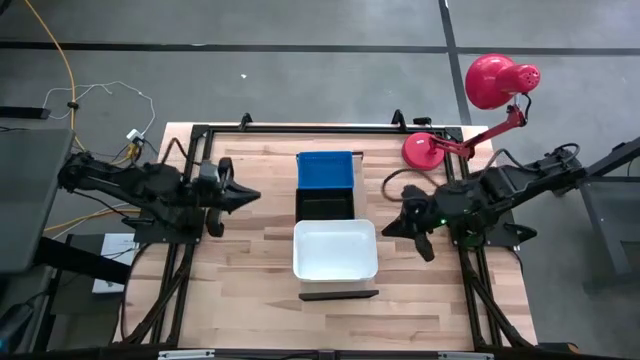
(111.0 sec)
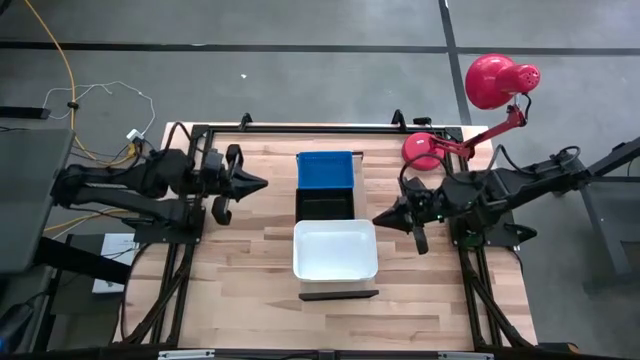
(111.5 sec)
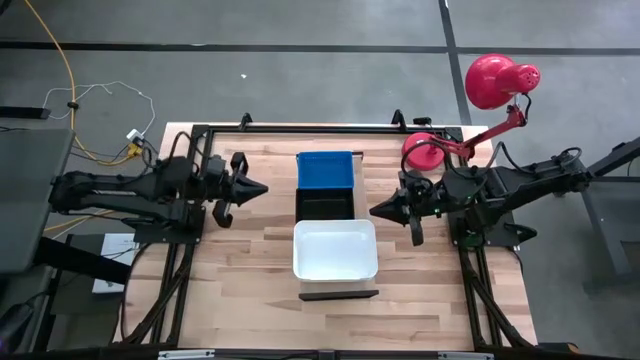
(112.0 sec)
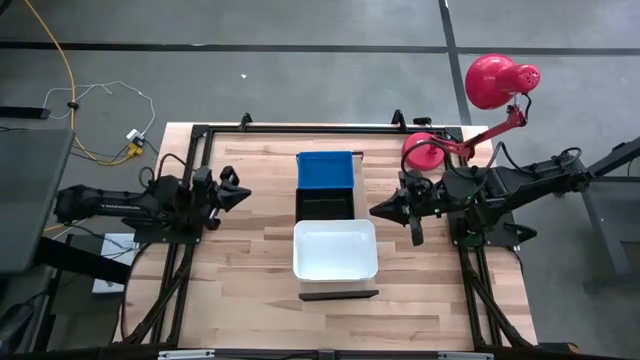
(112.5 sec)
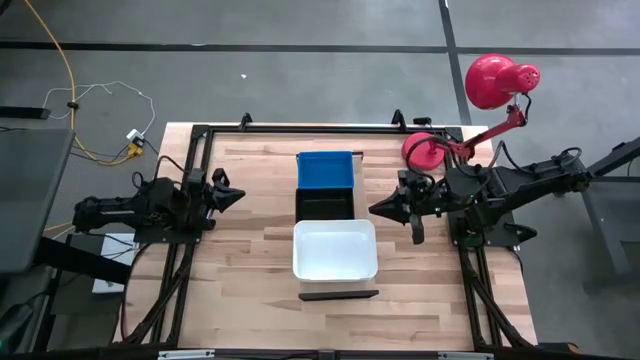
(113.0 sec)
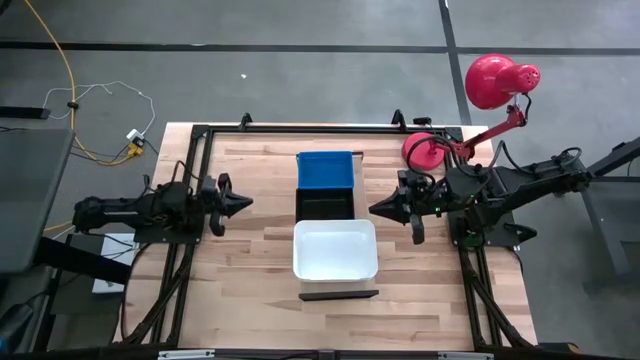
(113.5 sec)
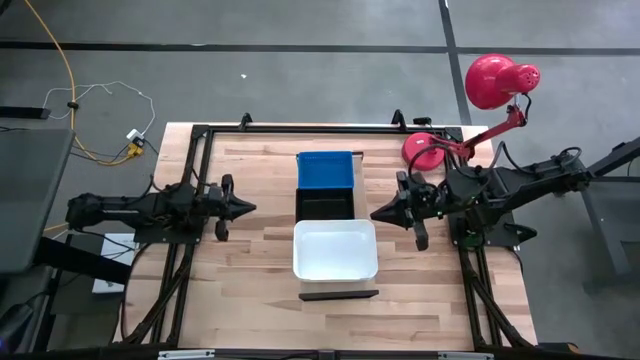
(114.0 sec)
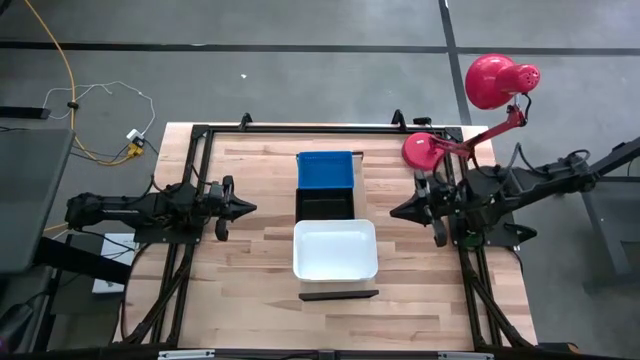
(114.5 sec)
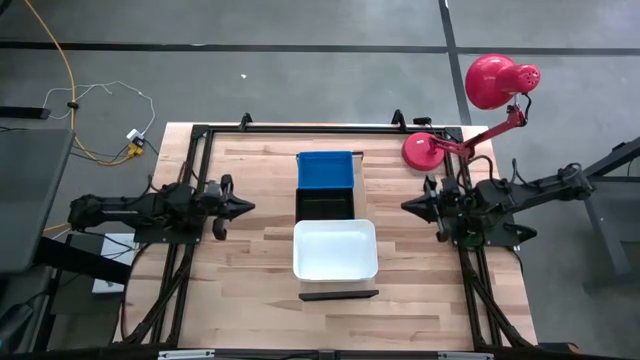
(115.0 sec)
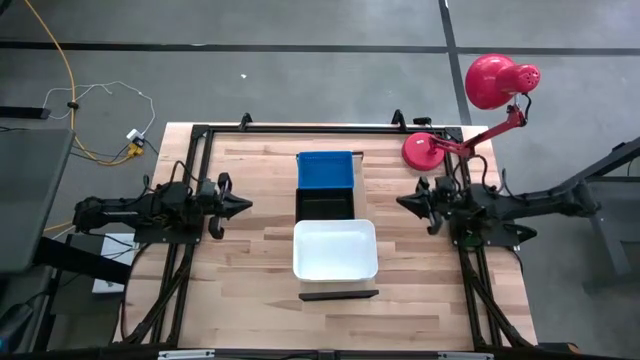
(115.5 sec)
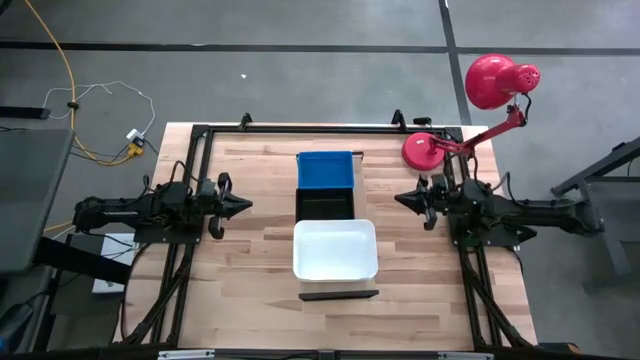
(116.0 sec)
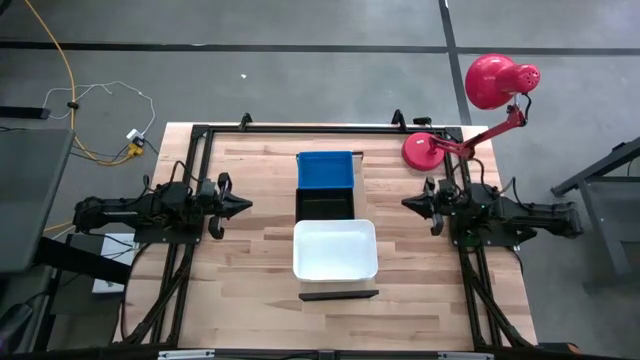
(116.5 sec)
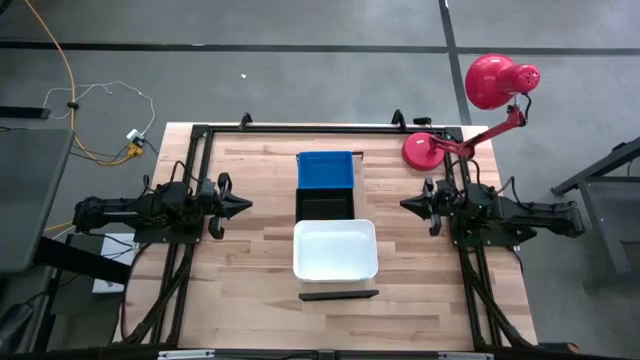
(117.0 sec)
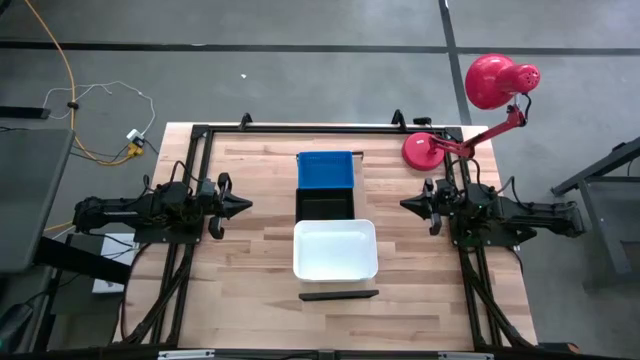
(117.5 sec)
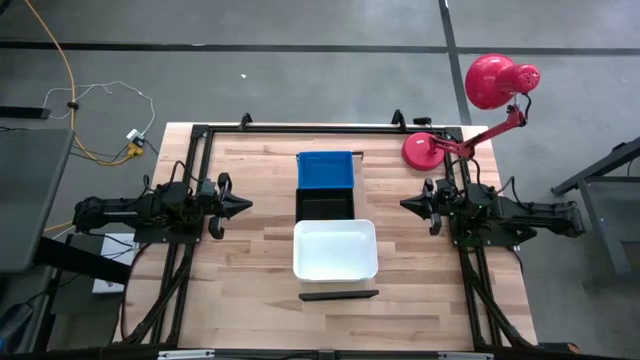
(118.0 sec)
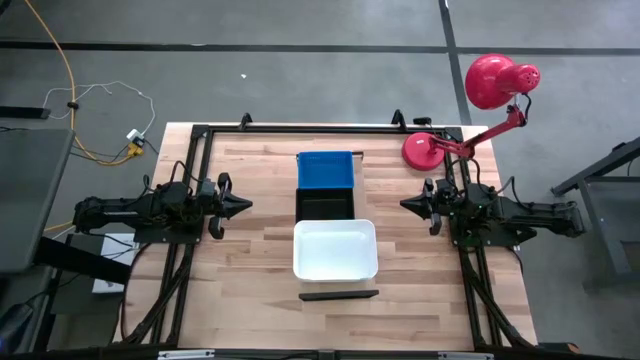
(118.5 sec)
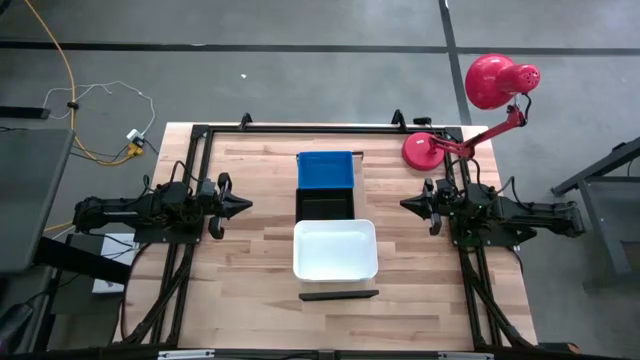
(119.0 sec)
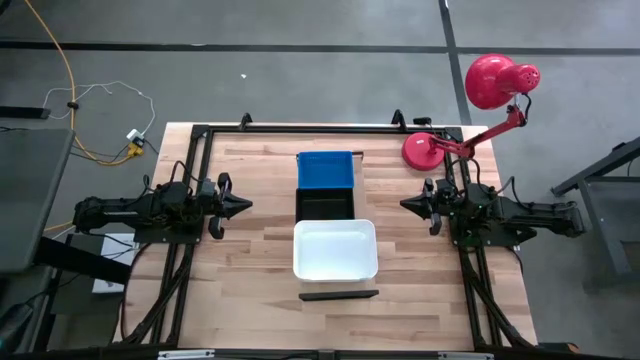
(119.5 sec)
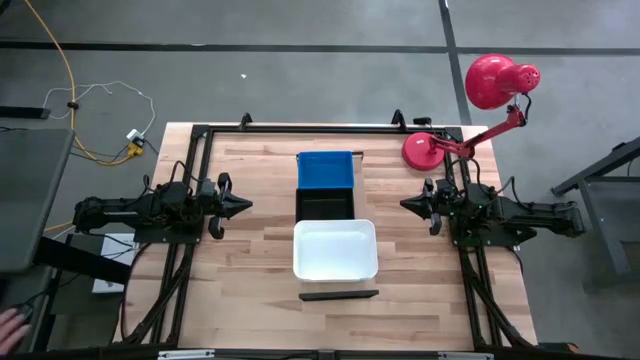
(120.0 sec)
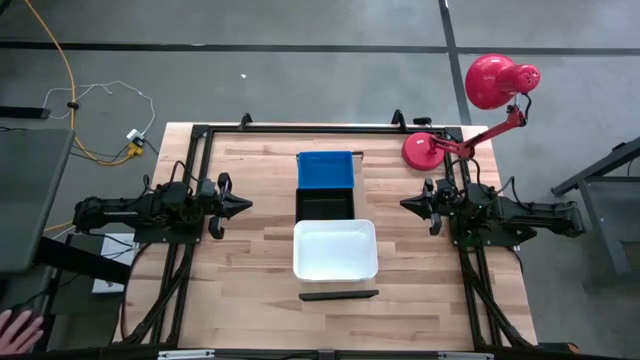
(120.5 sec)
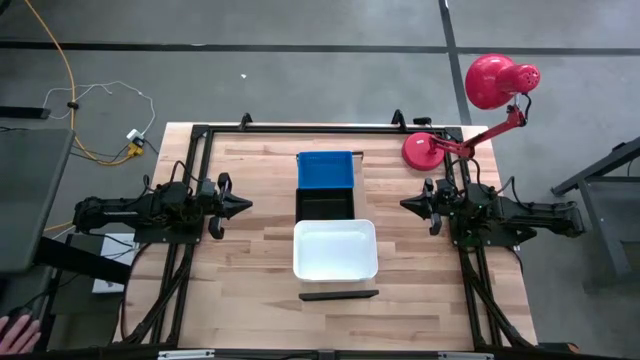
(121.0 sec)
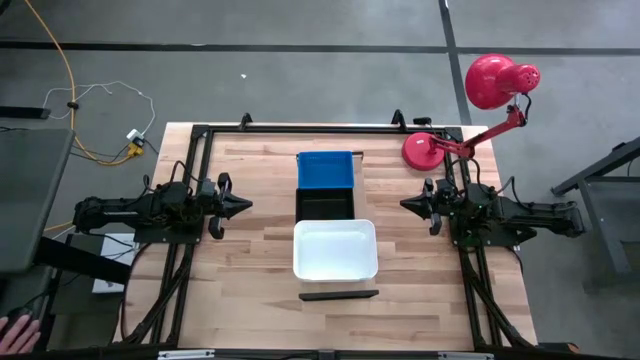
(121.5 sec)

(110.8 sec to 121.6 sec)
Task: Stack baskets on shelf by color
Return to Home Position

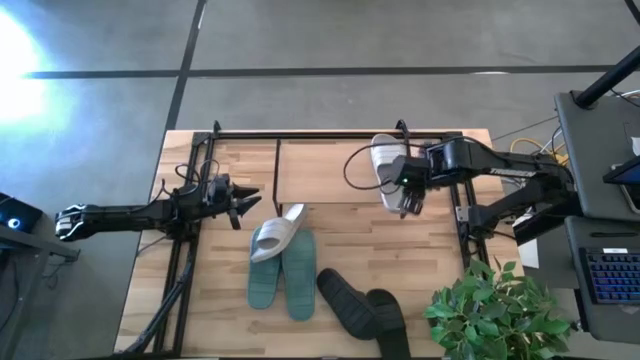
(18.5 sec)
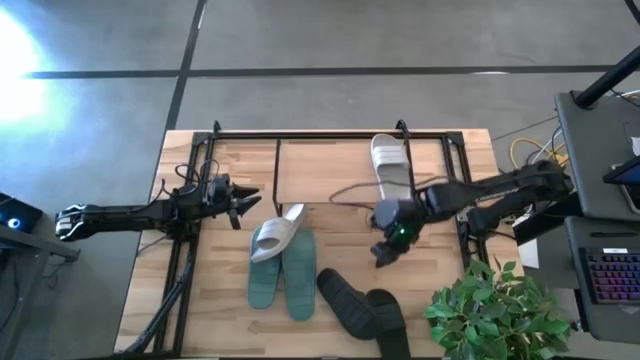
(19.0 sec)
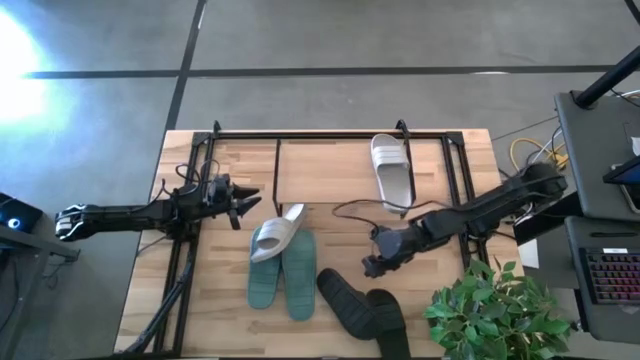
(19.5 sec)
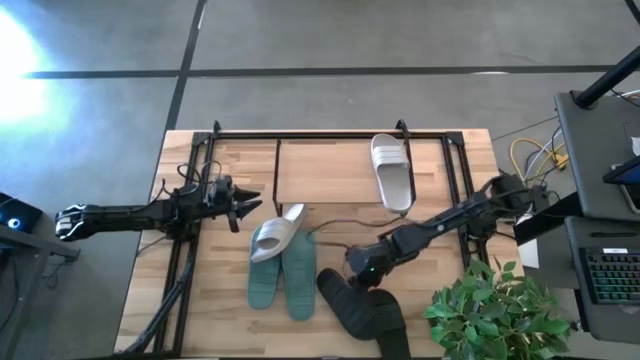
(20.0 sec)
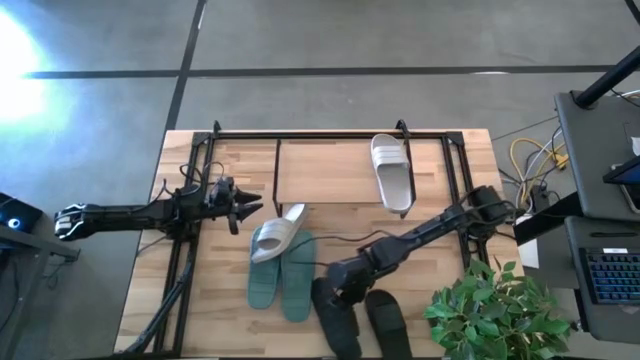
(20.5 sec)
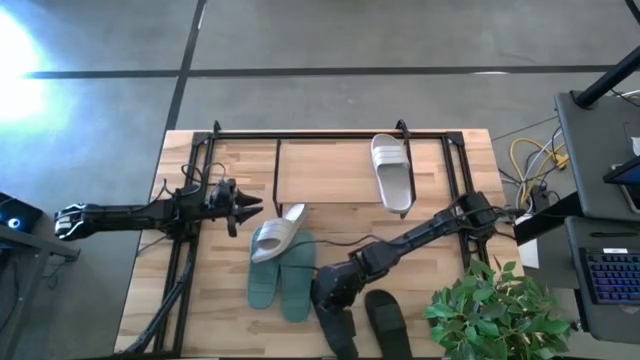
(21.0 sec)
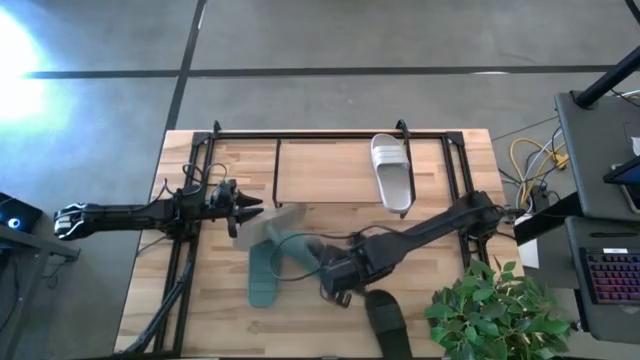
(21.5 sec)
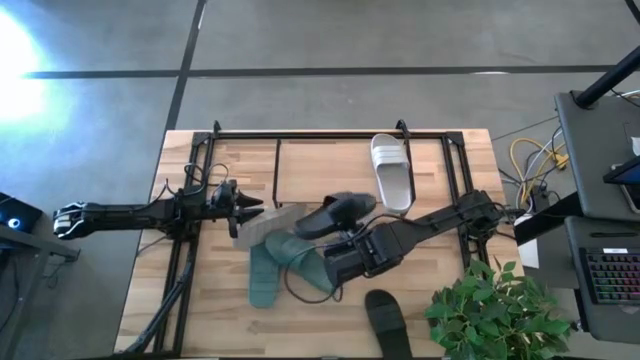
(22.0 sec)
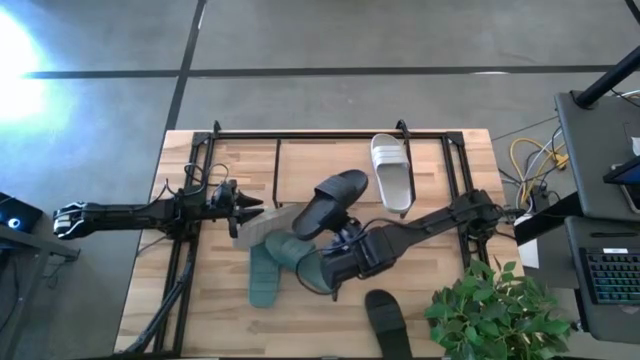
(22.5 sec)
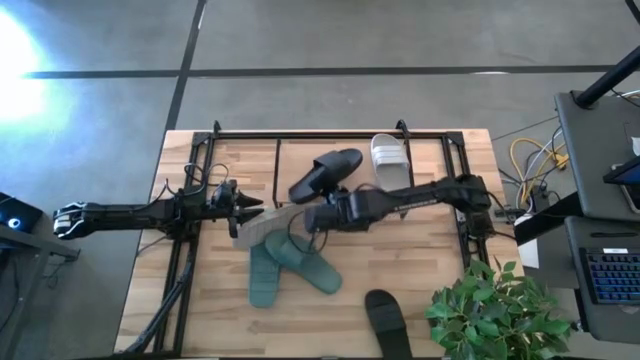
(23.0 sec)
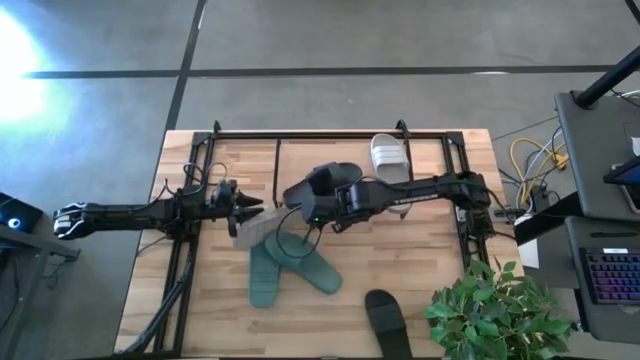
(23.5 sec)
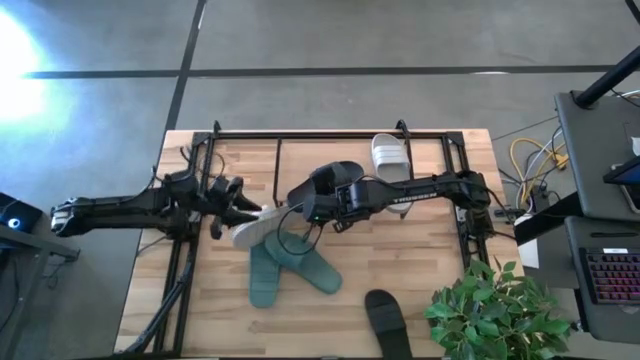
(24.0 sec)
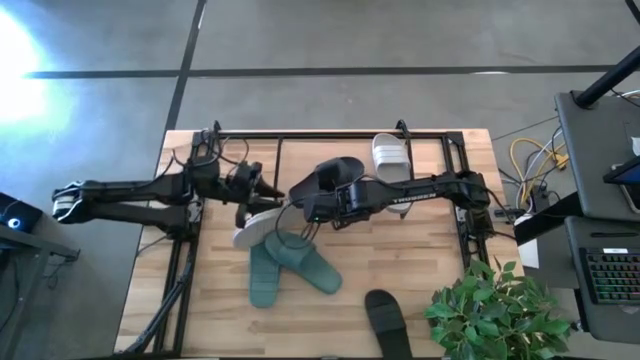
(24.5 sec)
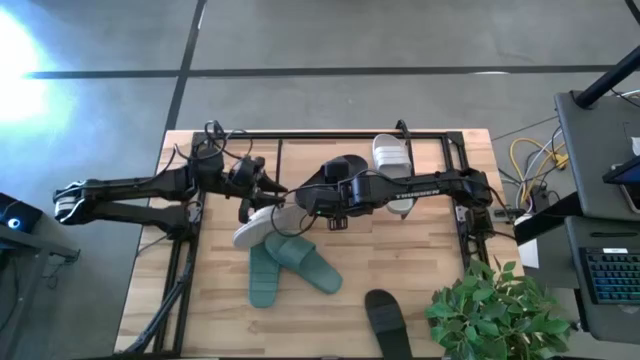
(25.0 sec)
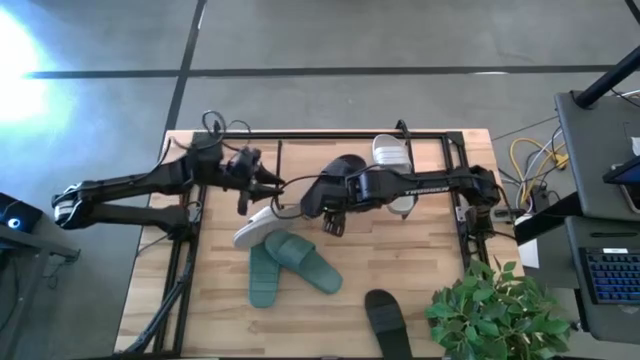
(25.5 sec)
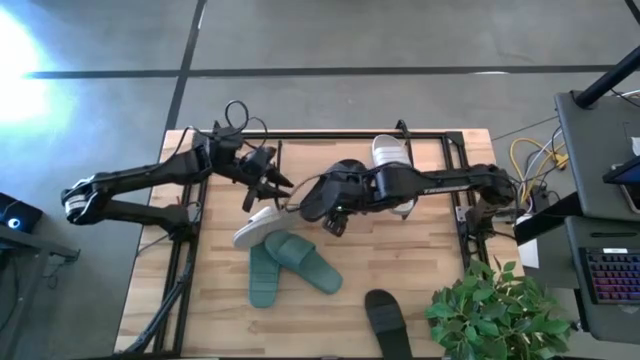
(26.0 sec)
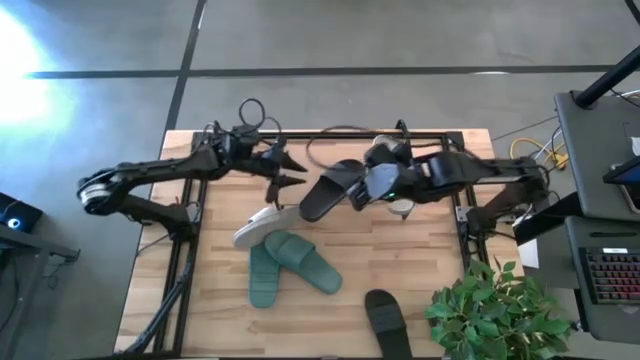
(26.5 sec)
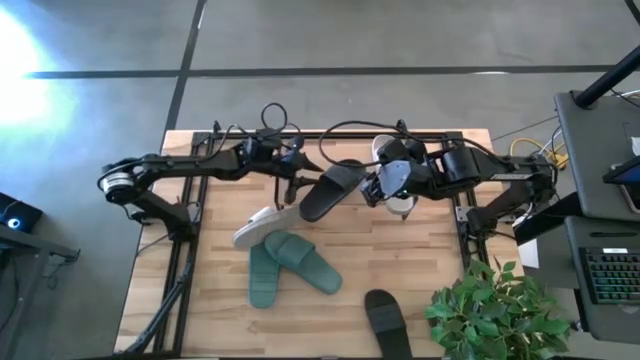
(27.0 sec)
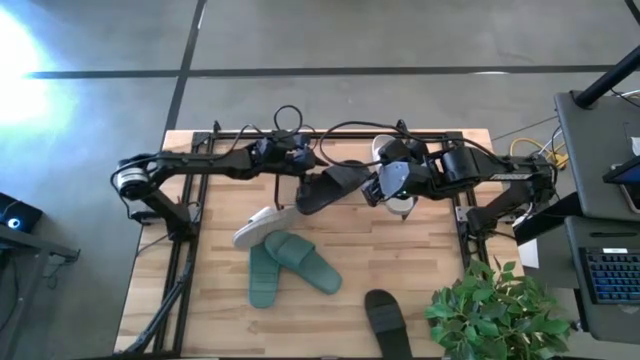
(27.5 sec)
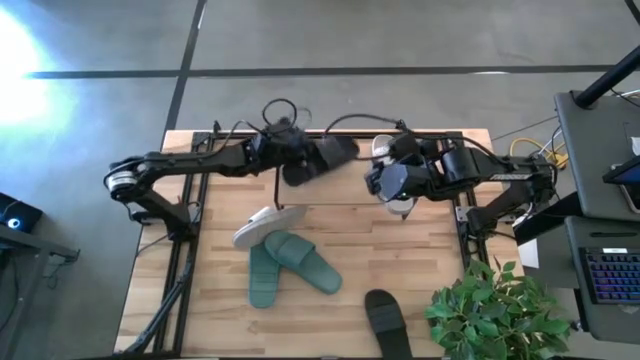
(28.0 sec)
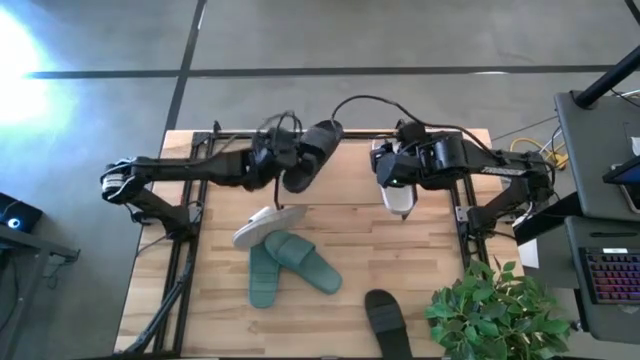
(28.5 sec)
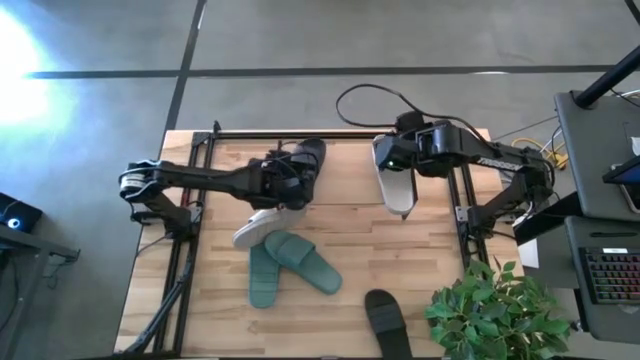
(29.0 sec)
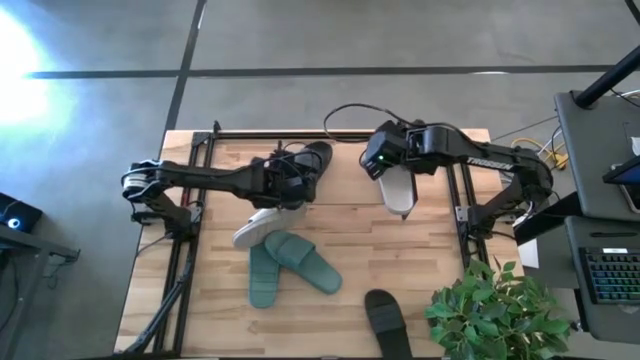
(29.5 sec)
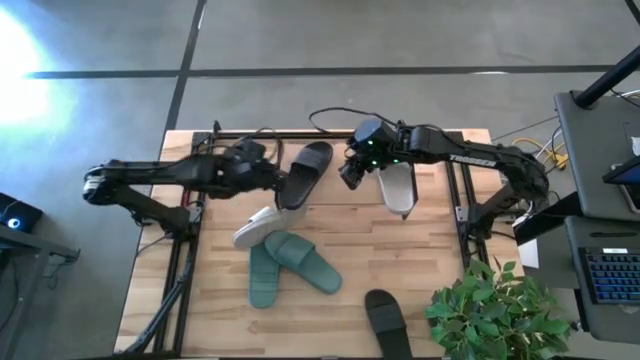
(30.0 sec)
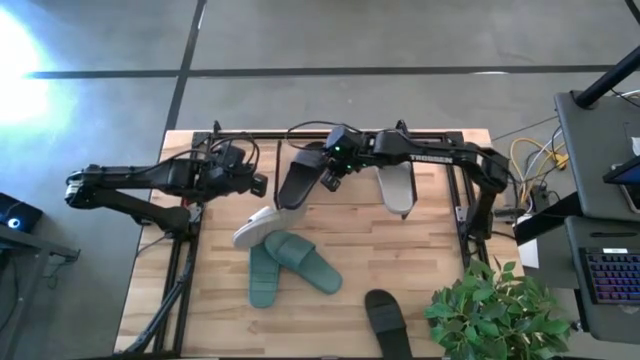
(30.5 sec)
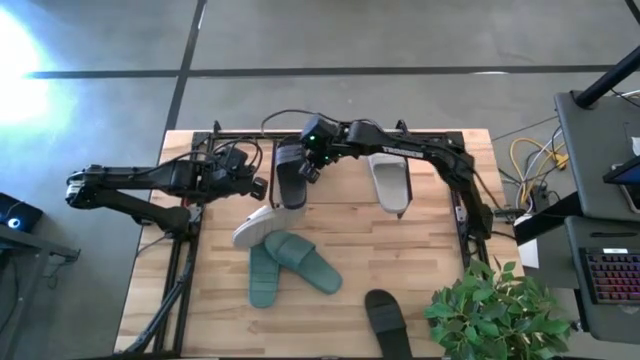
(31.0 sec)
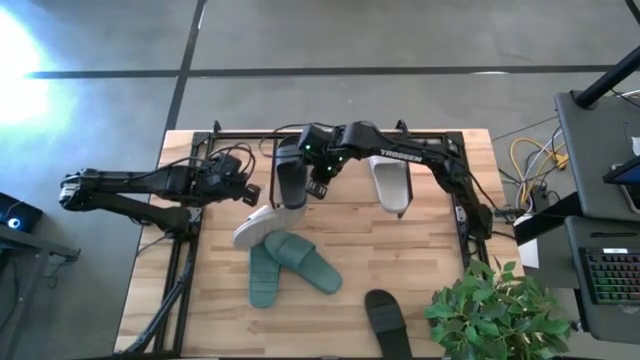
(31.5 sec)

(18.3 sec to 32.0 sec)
Task: Pick and place slides into the shelf
Put the left black slide on the shelf
